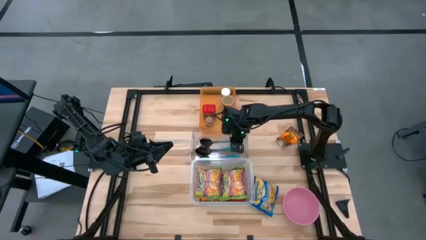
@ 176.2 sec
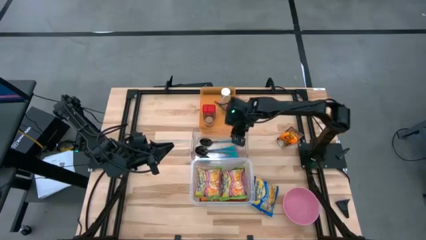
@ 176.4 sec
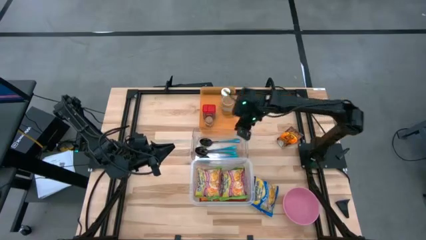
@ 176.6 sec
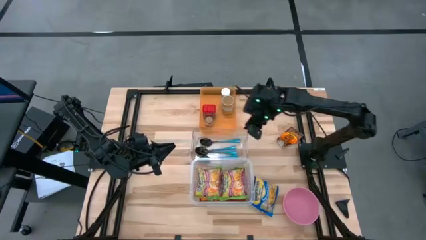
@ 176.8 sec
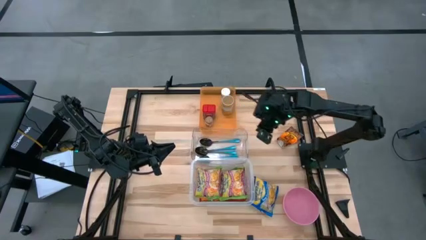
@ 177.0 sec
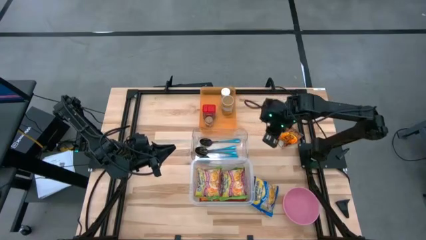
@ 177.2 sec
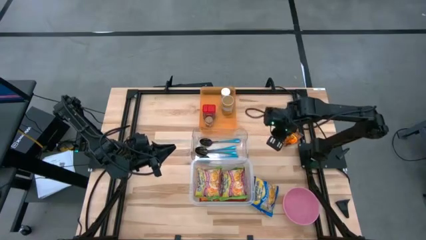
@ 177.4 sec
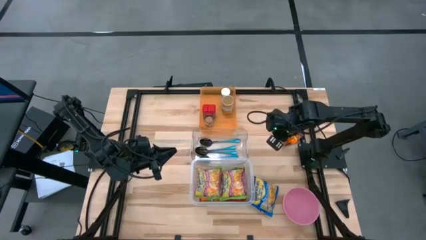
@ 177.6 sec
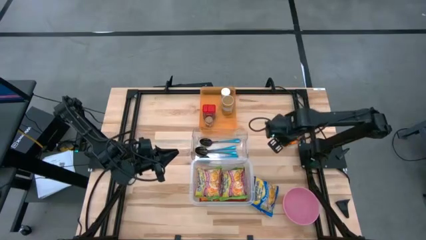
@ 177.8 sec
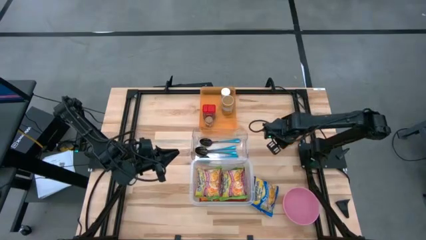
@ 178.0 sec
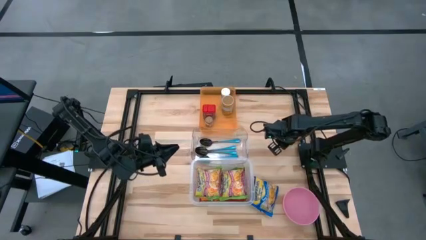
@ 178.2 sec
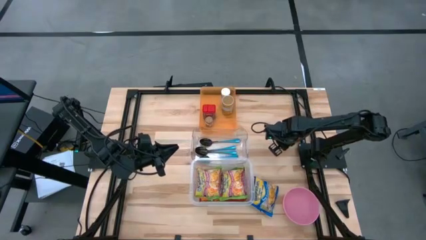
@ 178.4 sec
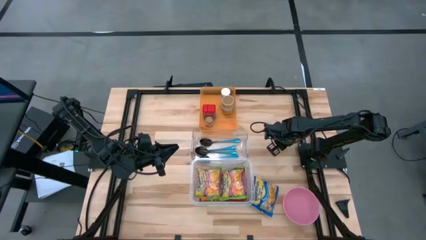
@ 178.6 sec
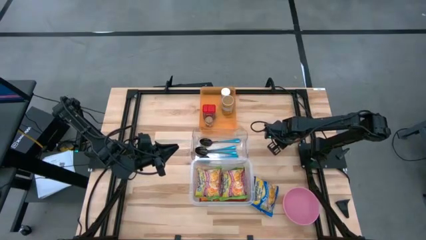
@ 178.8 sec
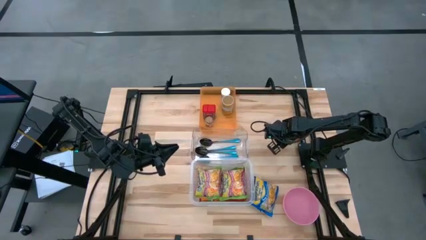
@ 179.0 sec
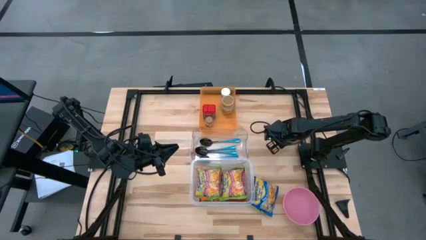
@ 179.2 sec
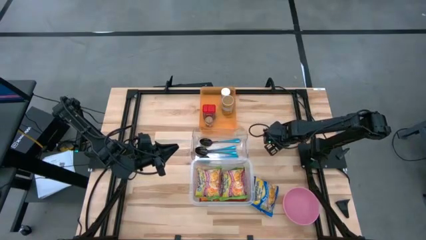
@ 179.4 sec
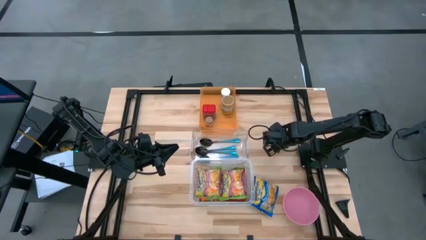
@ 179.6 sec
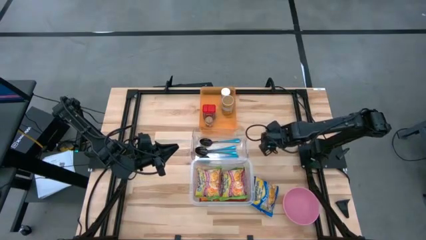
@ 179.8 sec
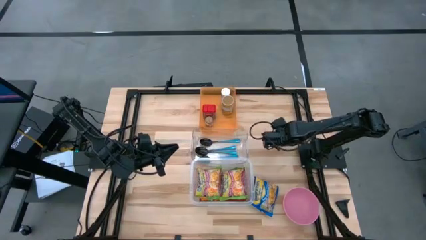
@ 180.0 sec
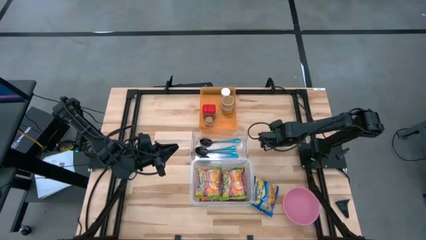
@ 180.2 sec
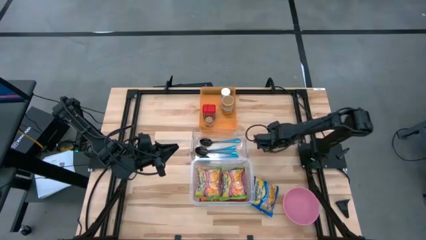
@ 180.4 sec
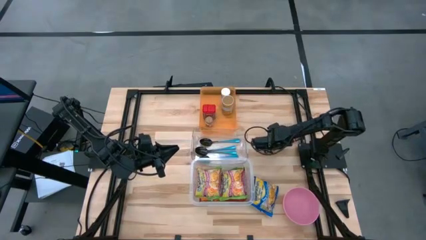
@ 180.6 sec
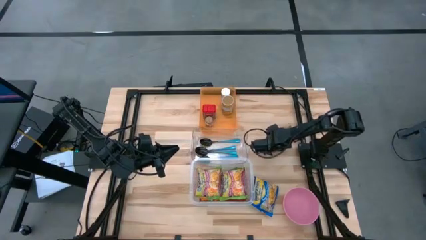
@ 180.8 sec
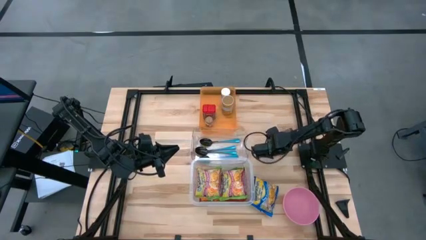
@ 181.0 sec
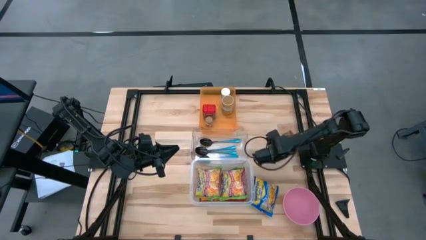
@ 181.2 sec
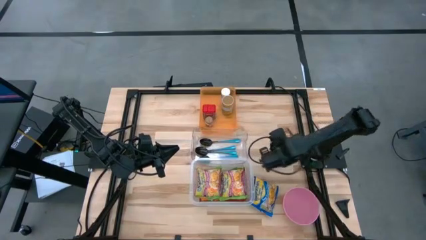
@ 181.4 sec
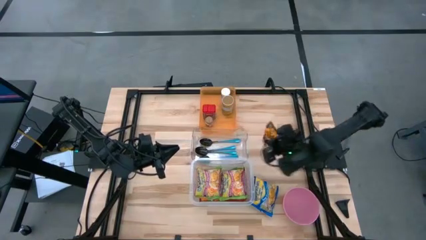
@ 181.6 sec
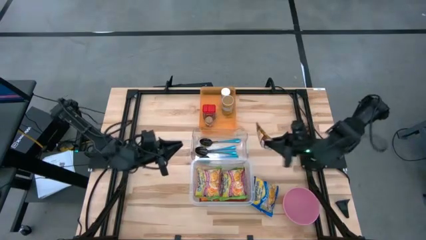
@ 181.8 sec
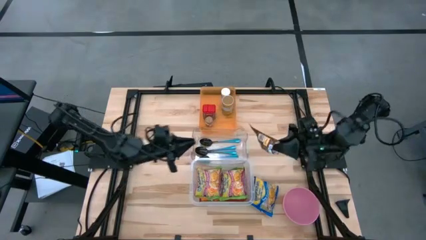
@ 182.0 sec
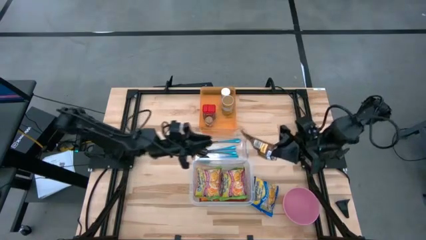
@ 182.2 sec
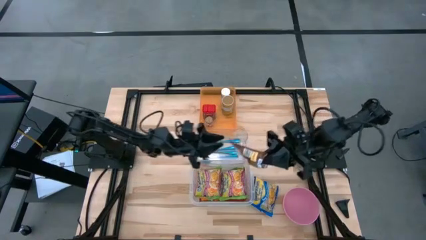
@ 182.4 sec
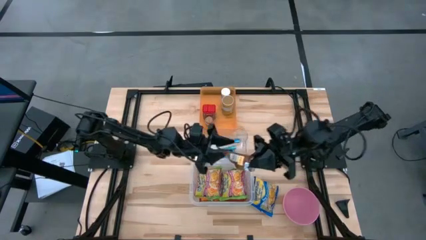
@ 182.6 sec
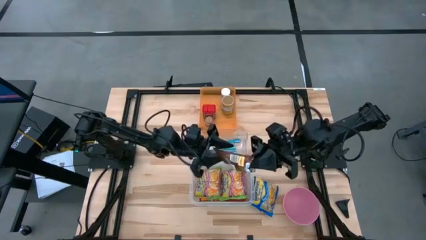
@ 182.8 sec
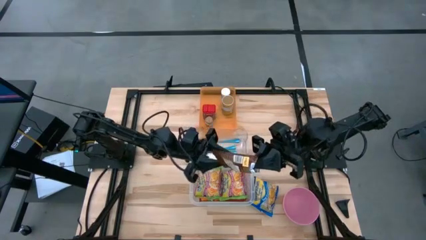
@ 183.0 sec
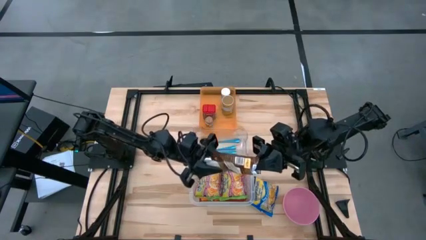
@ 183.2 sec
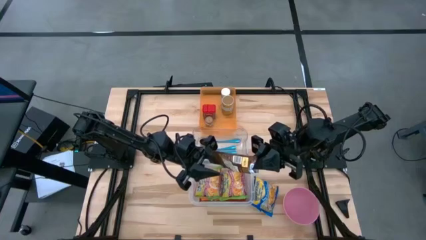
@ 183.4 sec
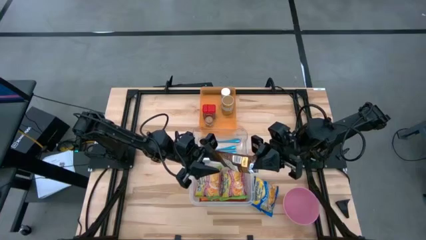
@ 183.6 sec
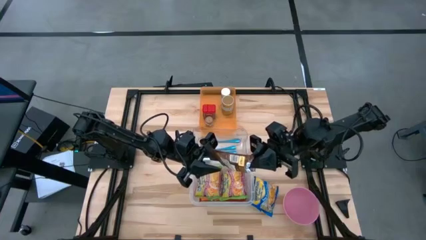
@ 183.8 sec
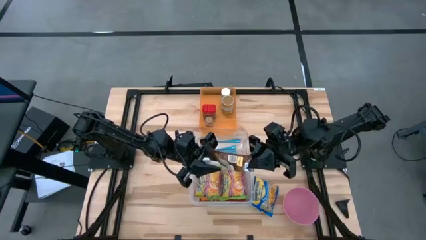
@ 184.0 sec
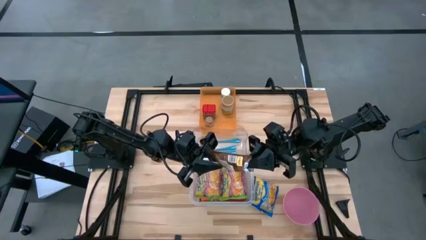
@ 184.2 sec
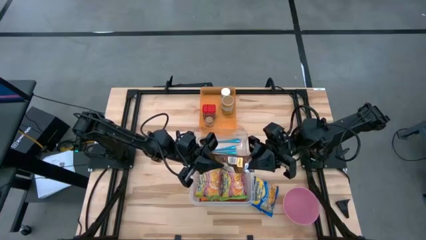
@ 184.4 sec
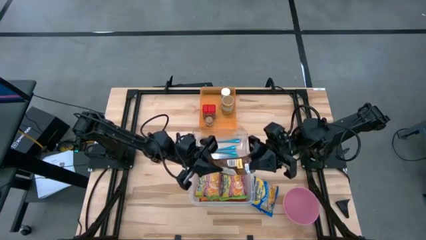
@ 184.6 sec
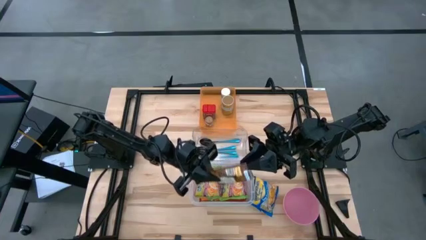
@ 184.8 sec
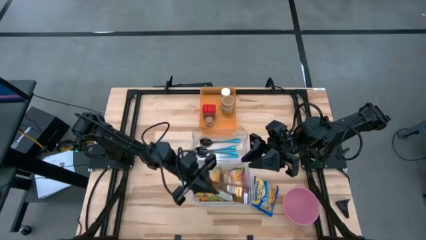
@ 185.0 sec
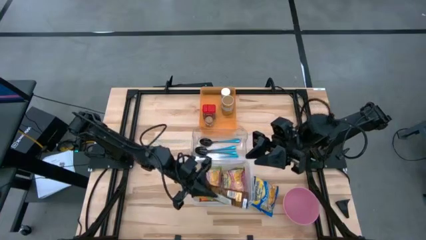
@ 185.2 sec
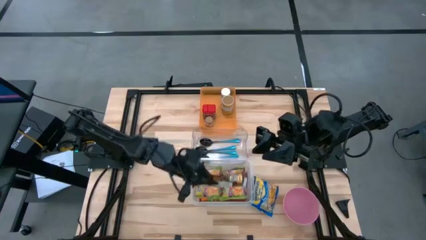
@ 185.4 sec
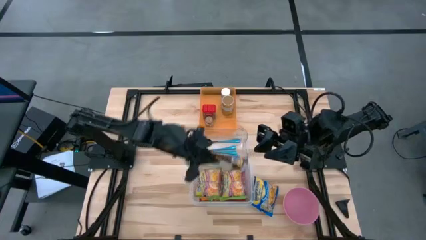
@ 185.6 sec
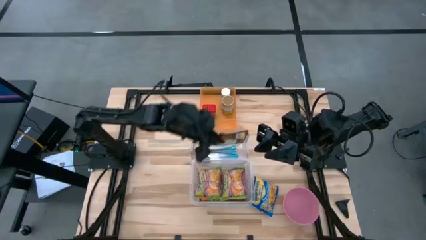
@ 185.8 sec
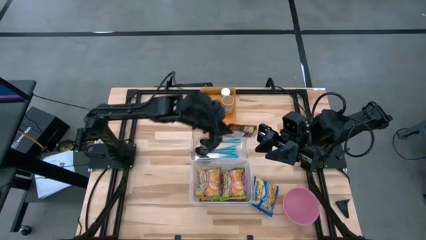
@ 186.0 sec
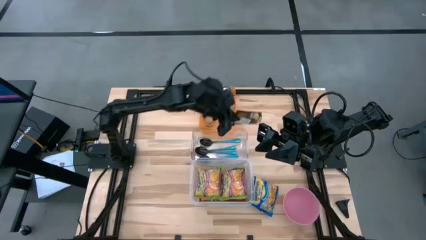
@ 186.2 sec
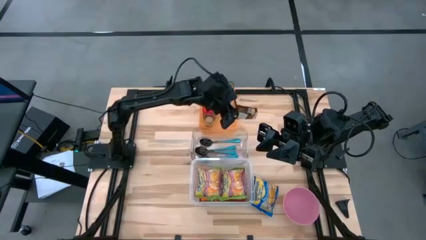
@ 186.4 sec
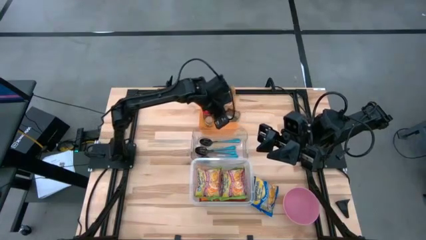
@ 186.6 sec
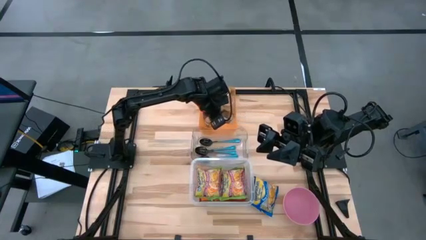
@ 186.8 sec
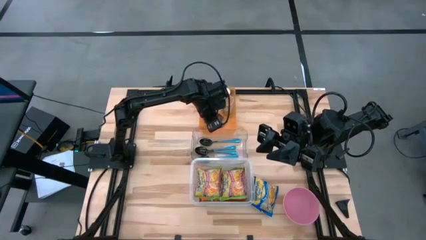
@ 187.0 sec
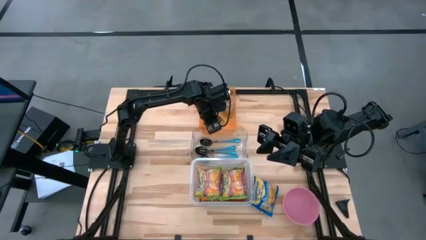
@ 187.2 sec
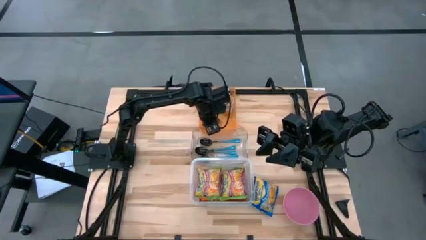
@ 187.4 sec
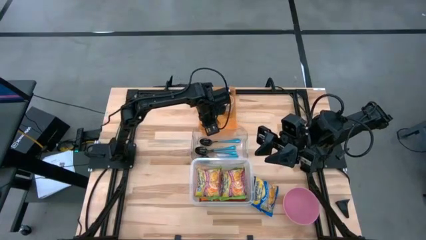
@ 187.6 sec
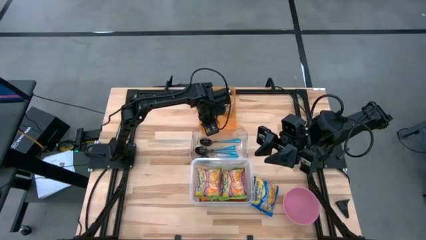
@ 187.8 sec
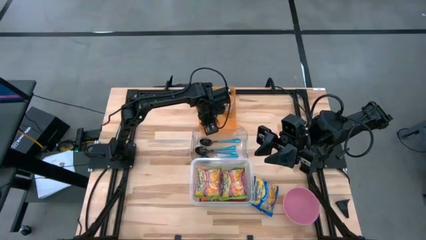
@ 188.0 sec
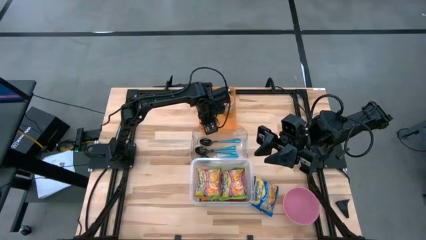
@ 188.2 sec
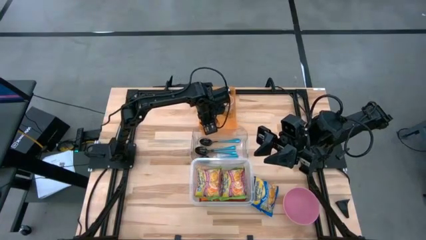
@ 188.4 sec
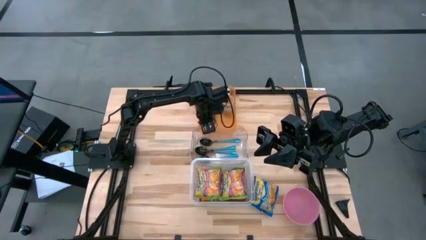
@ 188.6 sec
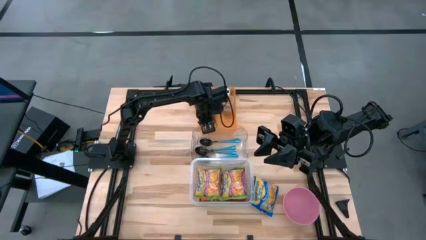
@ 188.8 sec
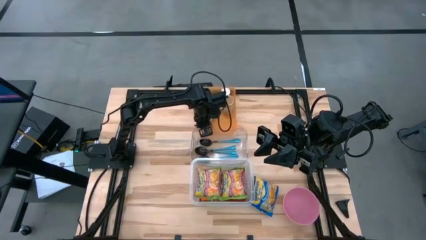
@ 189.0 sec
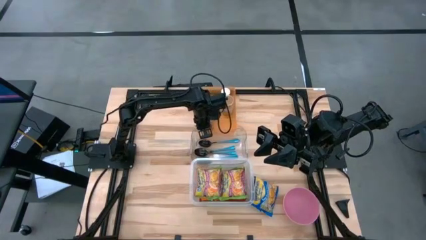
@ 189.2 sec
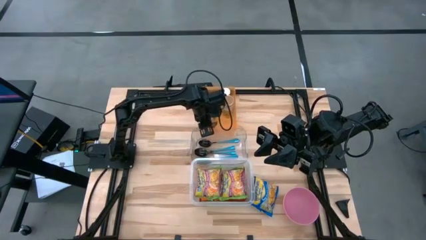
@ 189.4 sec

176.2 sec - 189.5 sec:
Task: Pick & Place Food Item
Put the orange seasoning bag into the orange transparent bin
